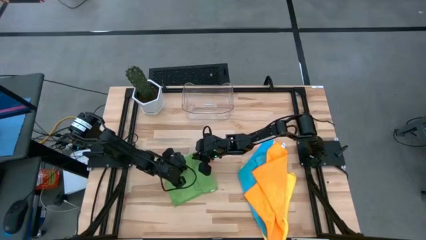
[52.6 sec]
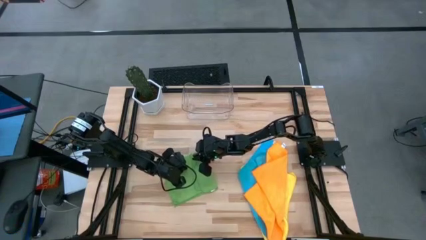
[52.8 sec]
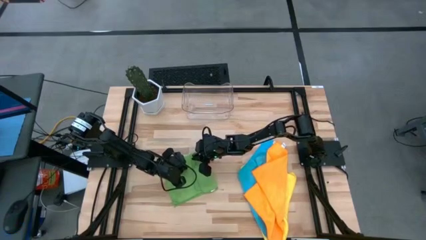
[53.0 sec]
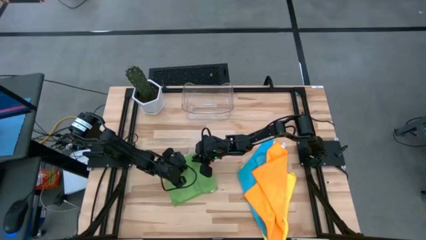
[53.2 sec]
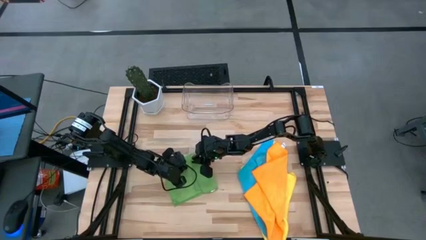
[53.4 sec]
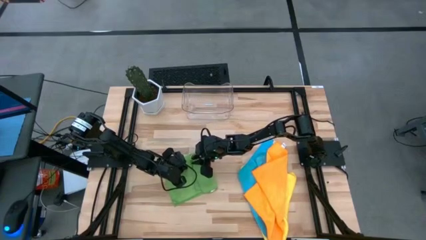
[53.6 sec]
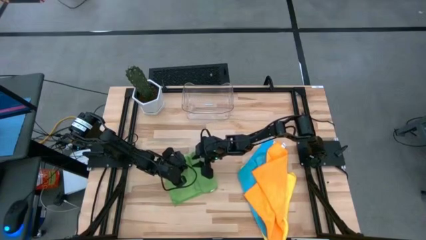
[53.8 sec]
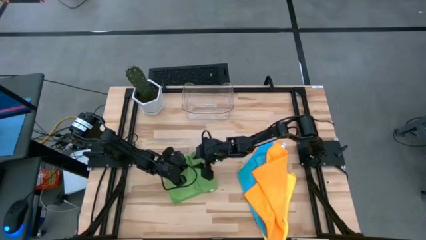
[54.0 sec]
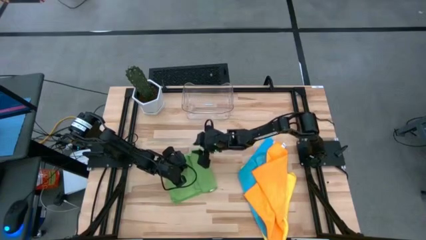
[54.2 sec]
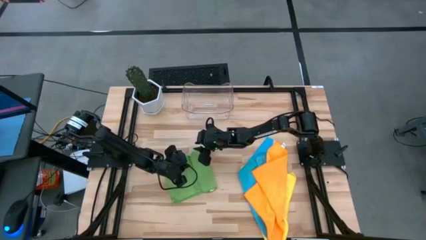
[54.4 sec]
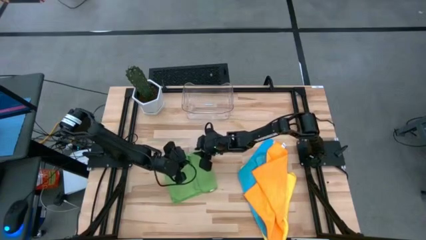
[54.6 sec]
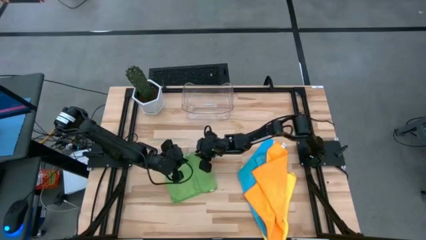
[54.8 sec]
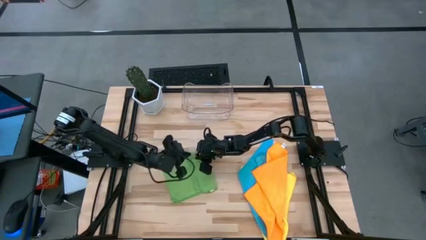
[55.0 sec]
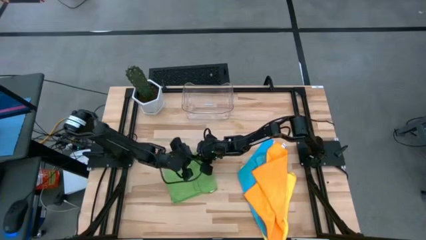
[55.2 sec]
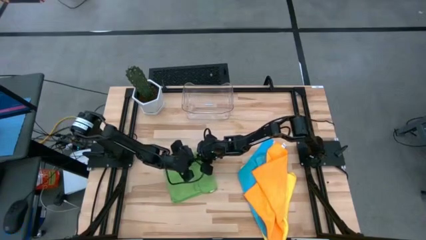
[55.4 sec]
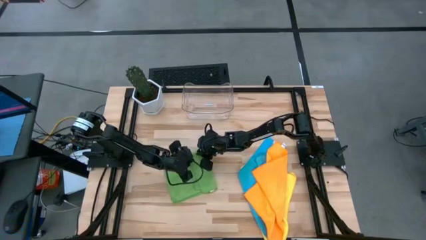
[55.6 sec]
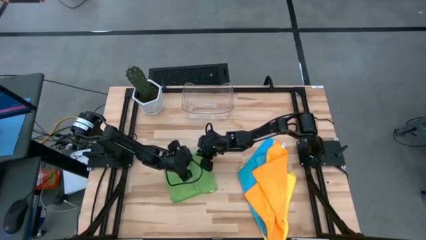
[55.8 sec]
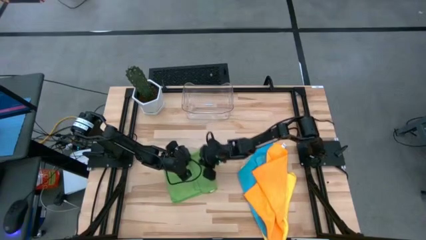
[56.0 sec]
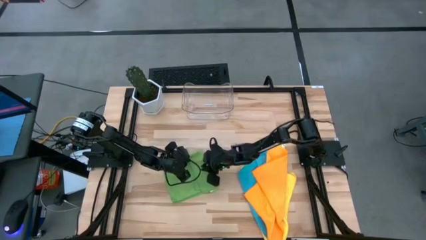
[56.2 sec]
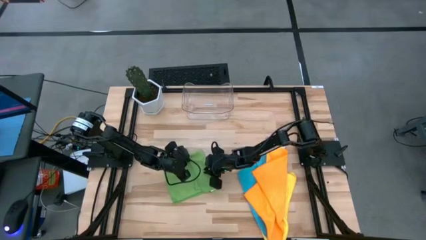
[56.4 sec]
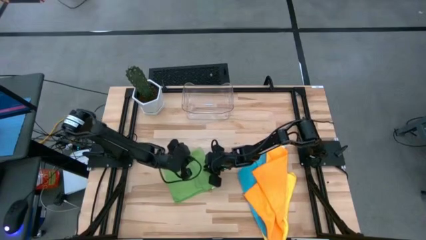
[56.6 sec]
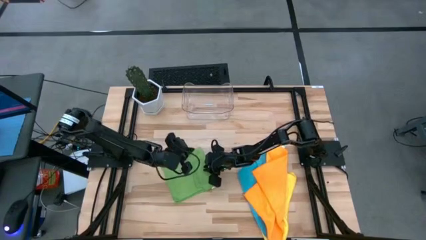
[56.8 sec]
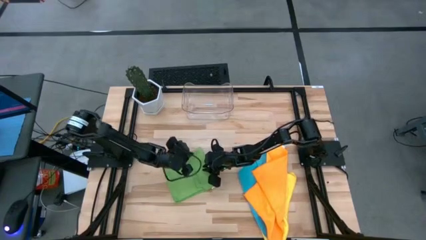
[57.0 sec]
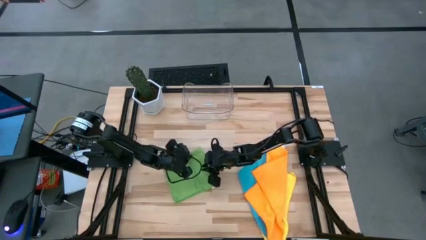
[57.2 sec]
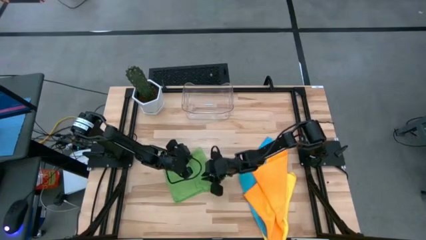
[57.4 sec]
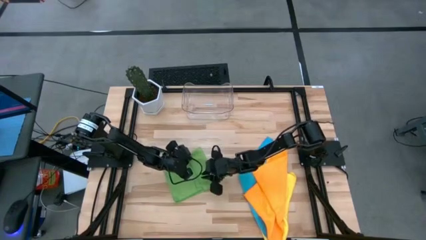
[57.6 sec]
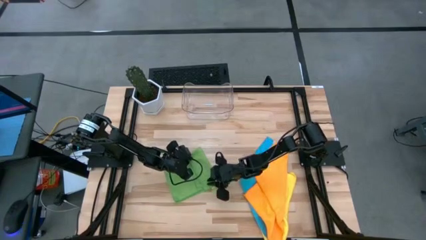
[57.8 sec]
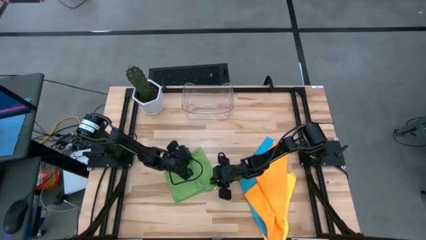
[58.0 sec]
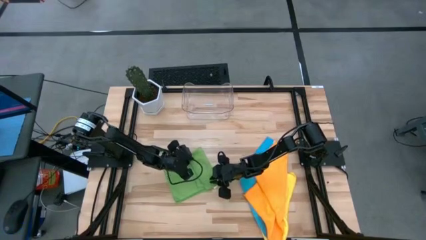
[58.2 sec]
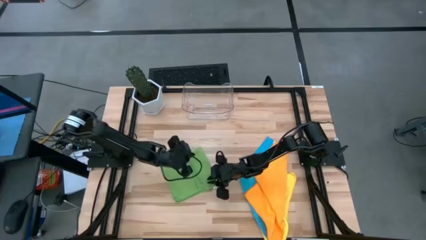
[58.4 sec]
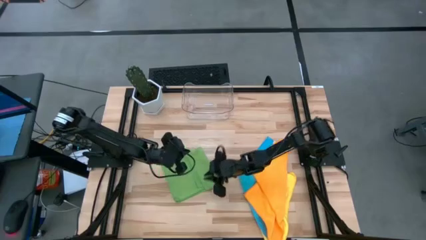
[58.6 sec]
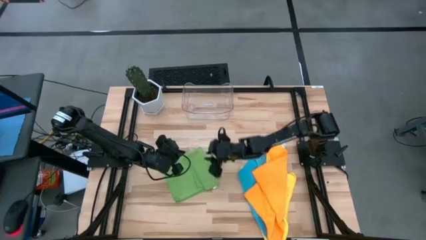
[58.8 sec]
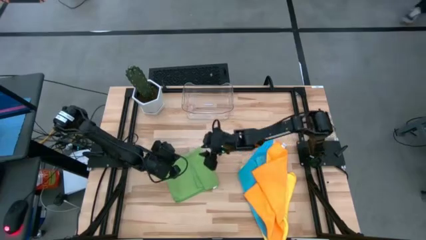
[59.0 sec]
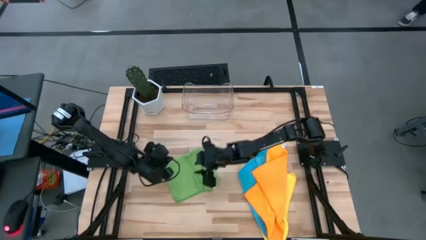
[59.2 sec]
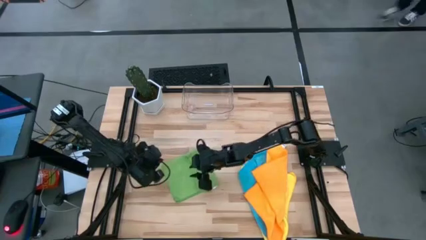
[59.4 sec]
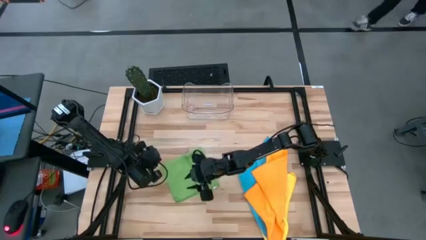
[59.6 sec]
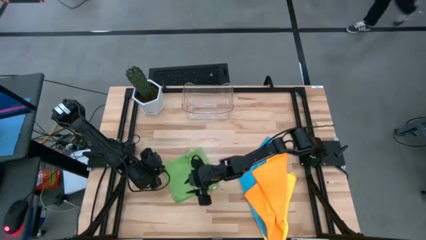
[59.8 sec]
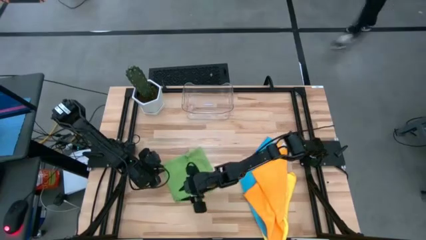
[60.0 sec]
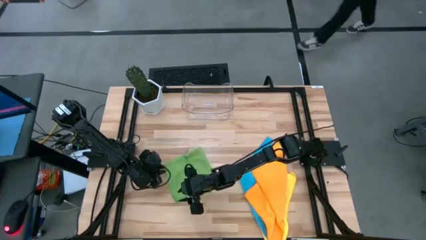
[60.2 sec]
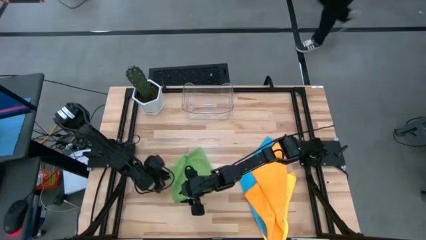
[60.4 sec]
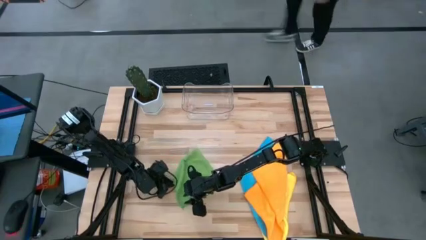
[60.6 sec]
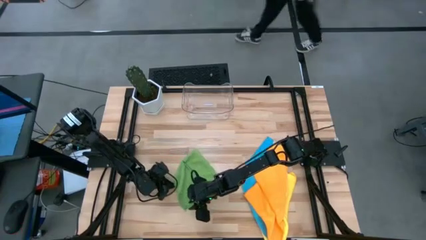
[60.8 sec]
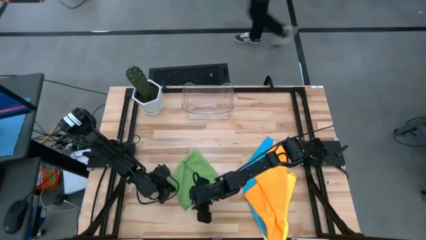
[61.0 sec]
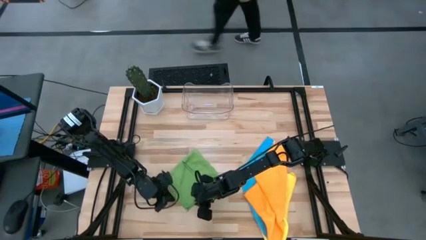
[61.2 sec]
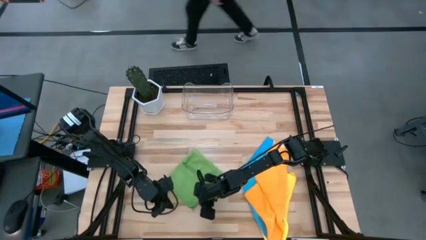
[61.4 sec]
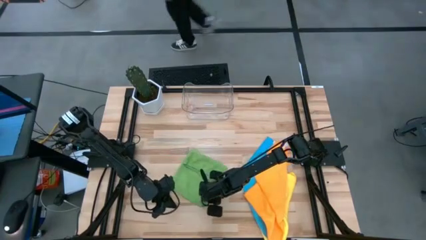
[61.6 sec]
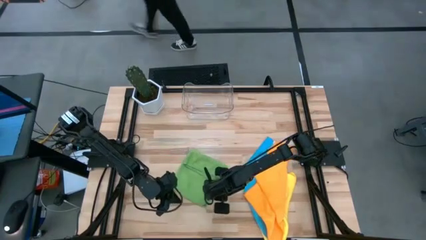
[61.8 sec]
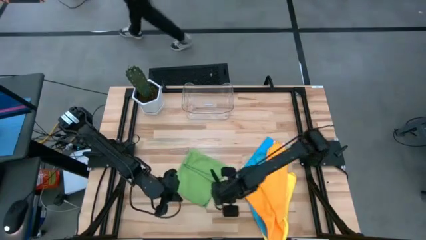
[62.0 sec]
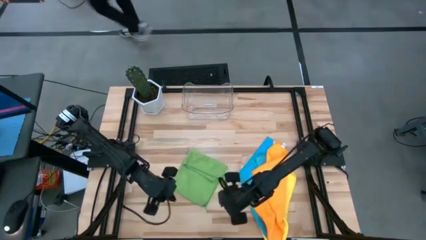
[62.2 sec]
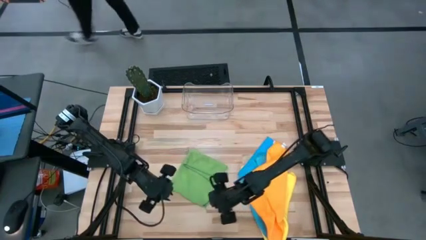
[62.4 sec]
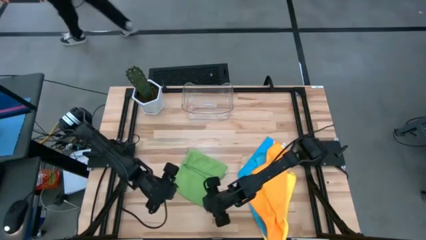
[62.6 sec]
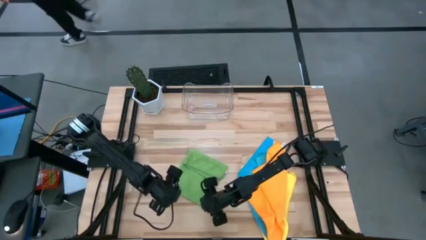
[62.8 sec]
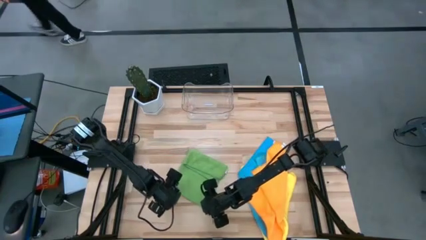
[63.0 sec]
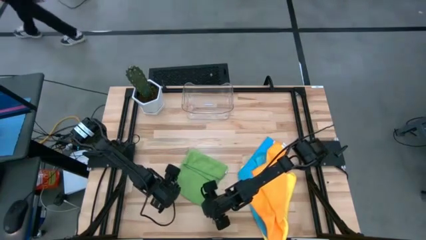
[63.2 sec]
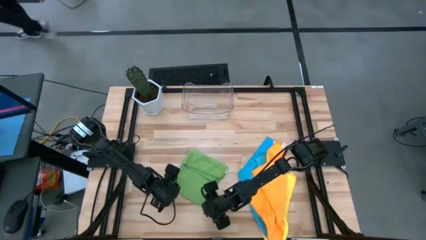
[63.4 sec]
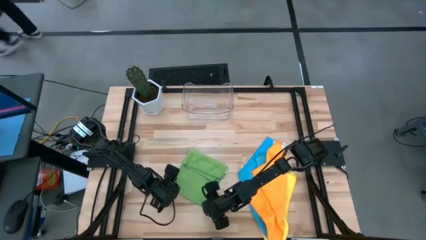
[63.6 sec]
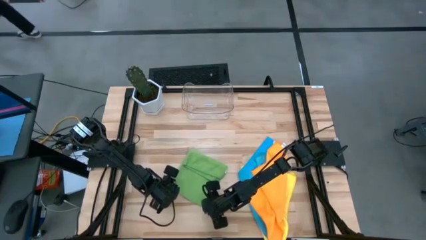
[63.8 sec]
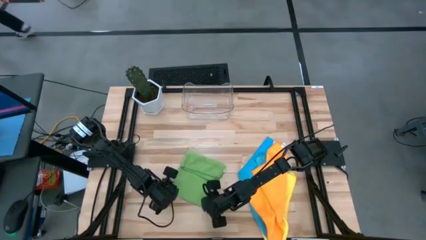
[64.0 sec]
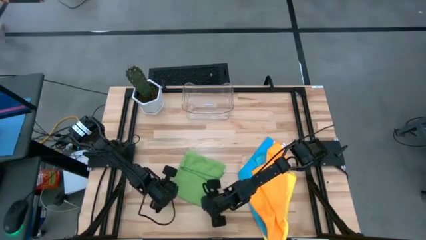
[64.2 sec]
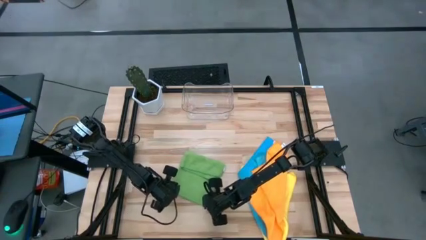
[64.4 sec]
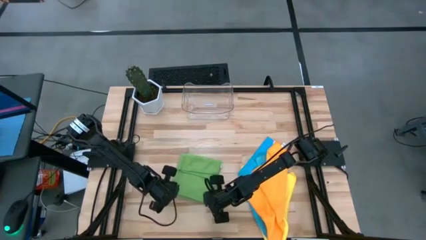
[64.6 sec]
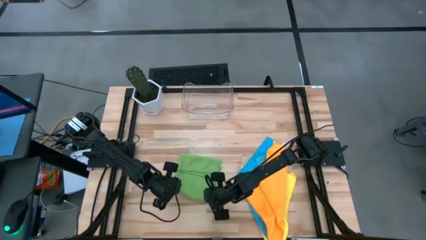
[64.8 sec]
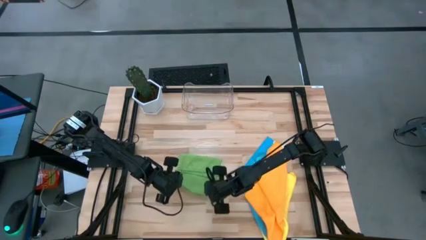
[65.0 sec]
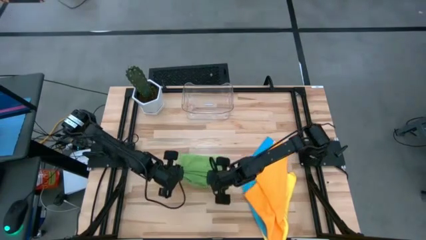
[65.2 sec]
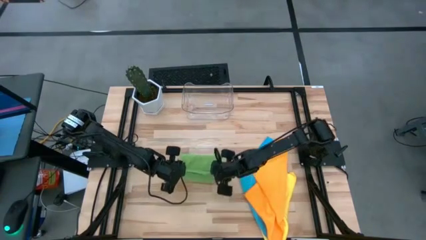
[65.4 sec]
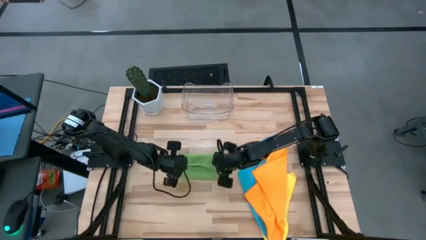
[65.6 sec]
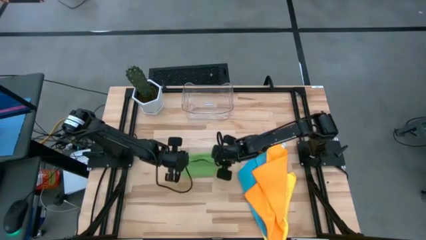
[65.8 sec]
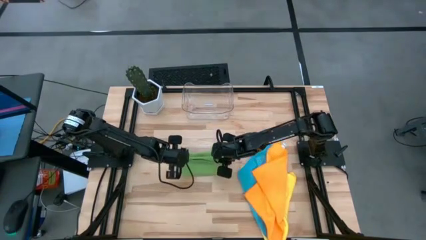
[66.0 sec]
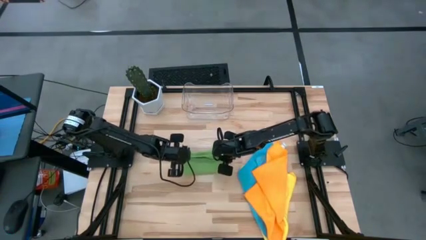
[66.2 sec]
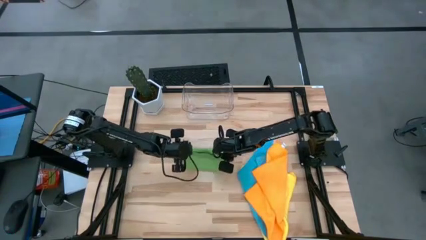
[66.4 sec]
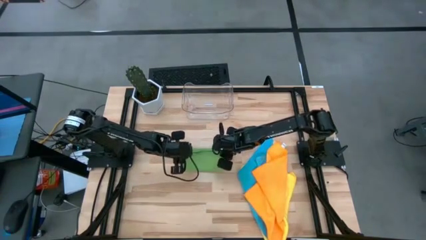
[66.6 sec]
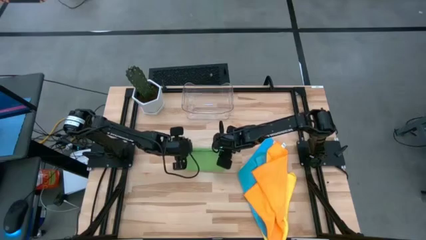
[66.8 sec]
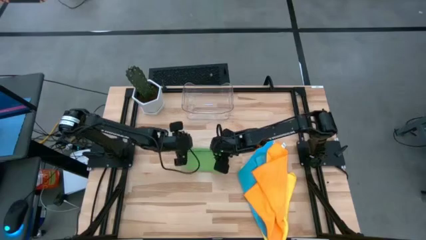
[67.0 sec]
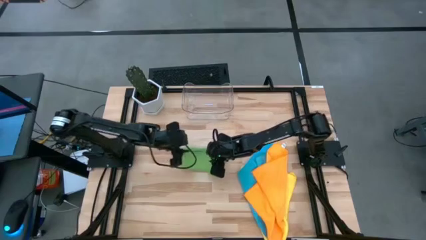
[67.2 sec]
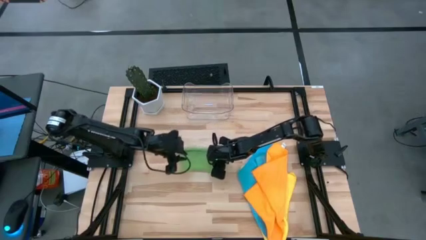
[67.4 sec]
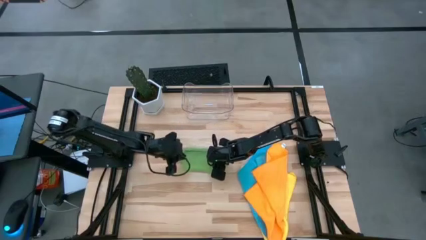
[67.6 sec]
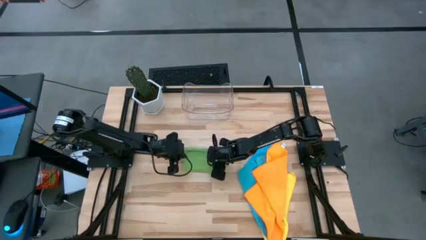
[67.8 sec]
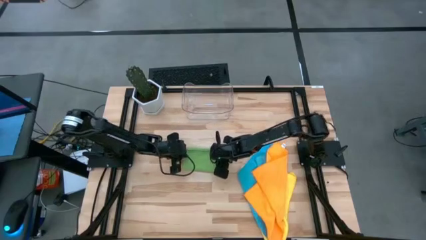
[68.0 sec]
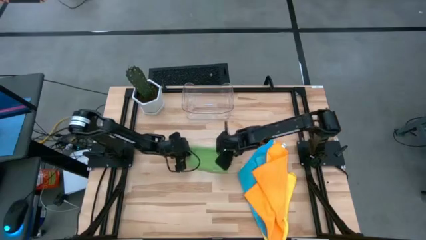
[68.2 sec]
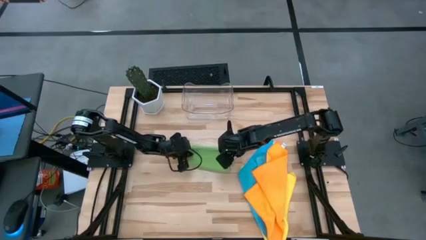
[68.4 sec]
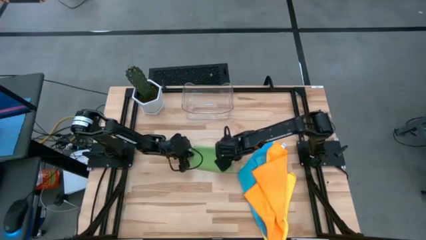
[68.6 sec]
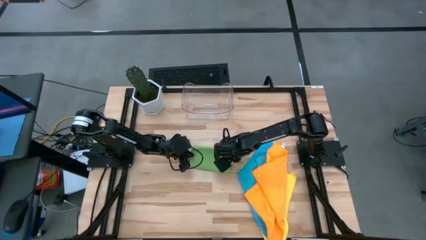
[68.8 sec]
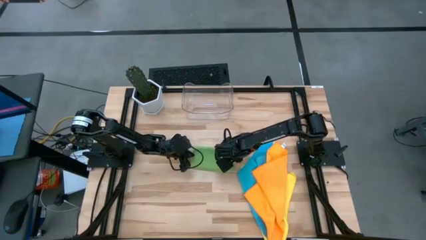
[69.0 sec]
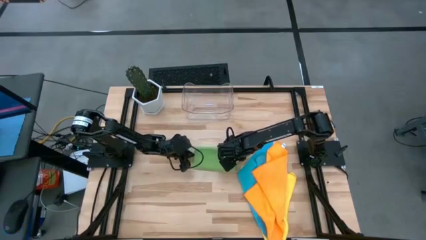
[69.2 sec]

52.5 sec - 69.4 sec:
Task: Fold microfiber towels
Fold the green towel
